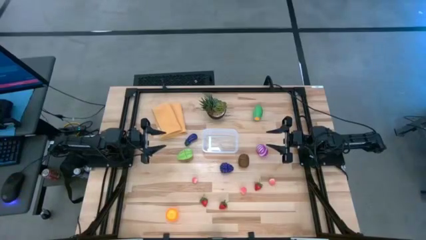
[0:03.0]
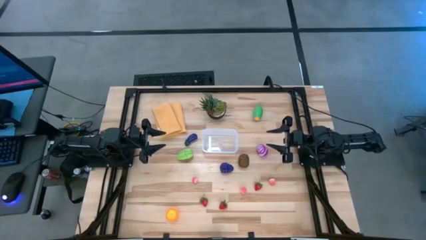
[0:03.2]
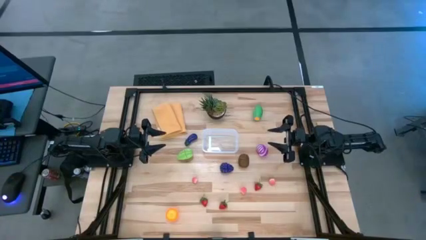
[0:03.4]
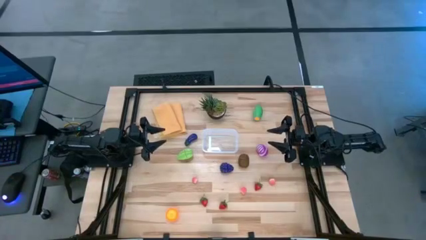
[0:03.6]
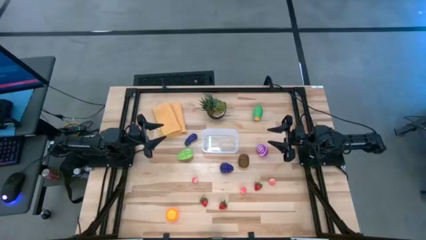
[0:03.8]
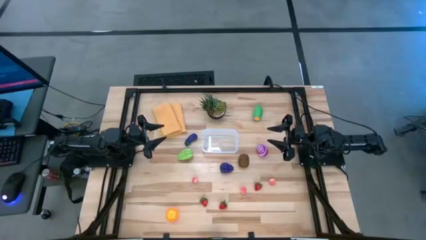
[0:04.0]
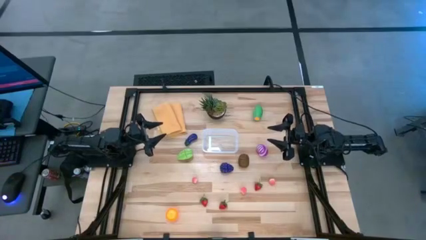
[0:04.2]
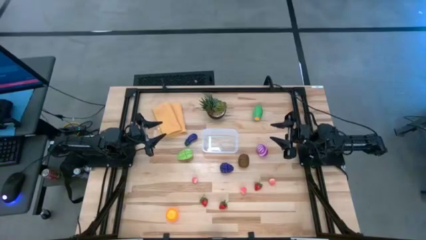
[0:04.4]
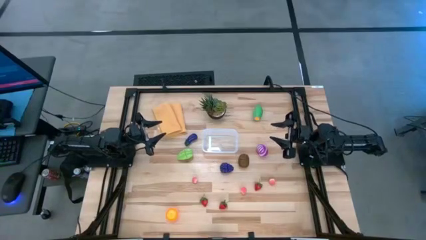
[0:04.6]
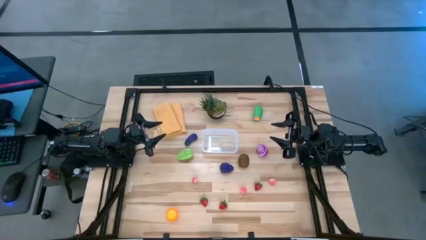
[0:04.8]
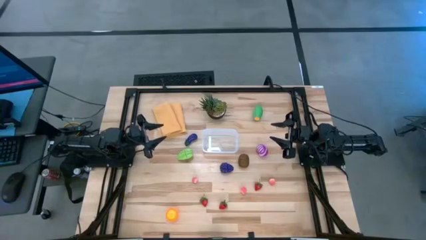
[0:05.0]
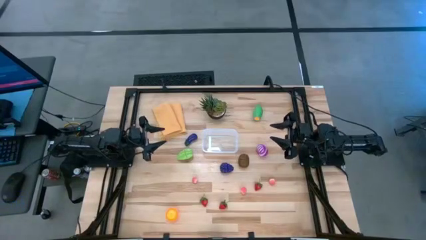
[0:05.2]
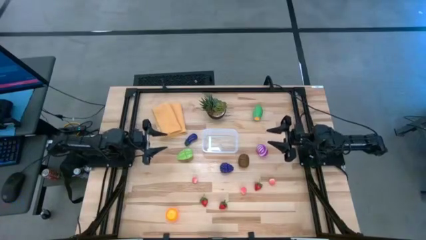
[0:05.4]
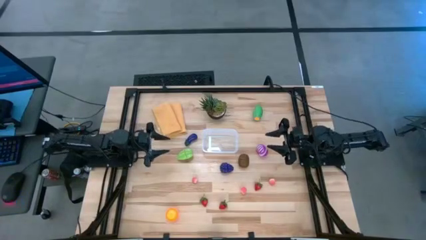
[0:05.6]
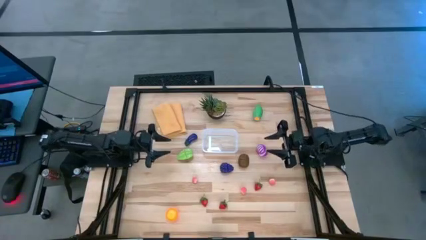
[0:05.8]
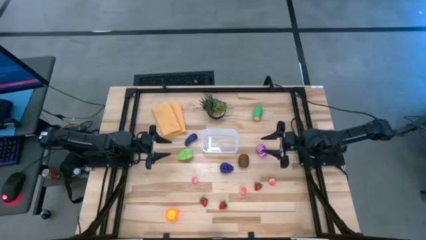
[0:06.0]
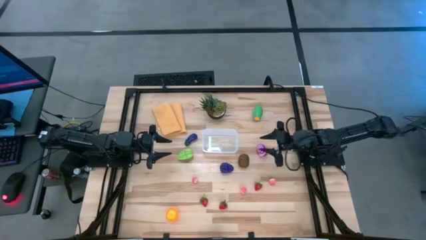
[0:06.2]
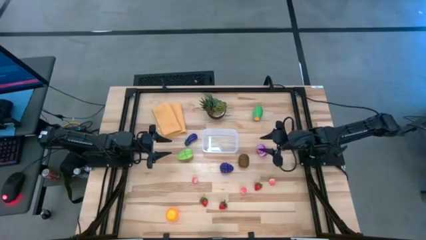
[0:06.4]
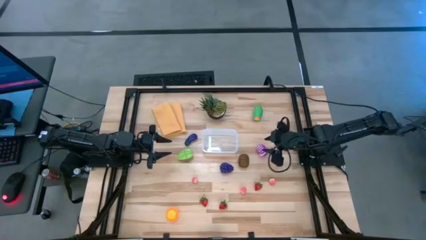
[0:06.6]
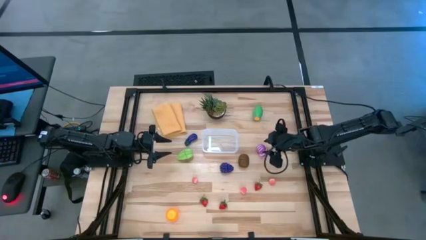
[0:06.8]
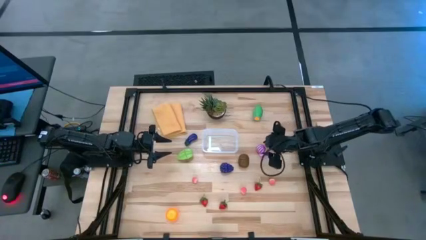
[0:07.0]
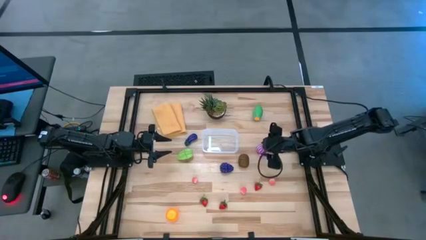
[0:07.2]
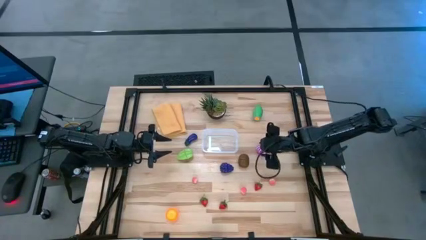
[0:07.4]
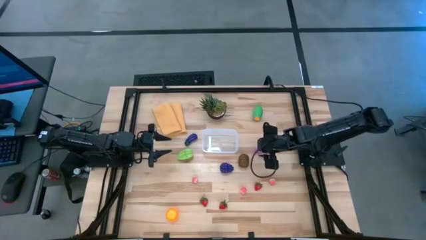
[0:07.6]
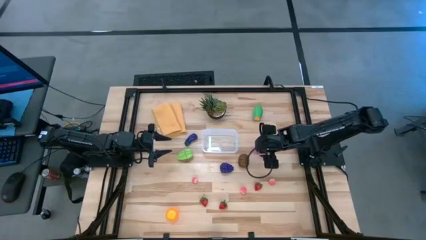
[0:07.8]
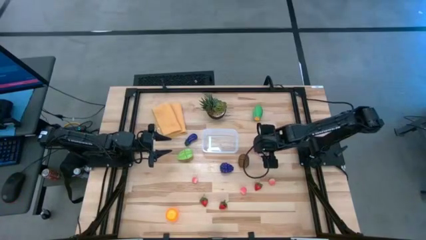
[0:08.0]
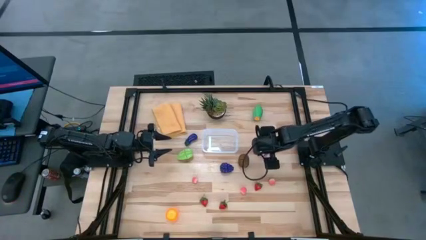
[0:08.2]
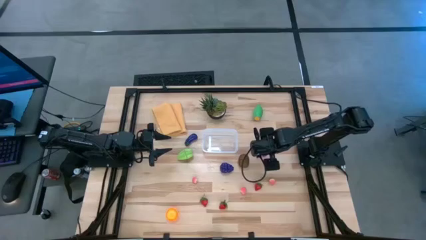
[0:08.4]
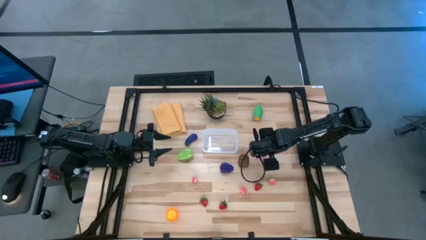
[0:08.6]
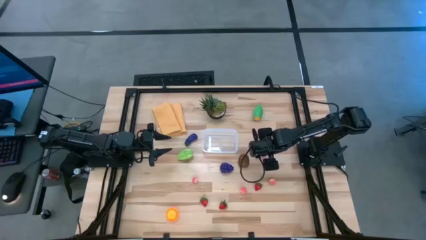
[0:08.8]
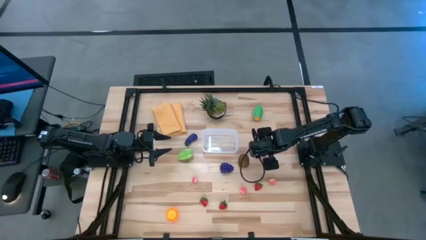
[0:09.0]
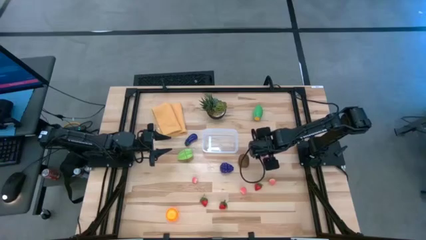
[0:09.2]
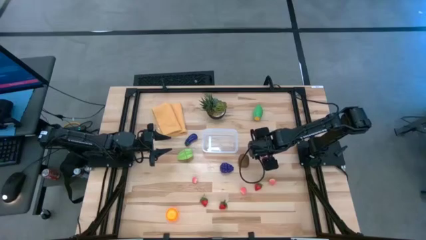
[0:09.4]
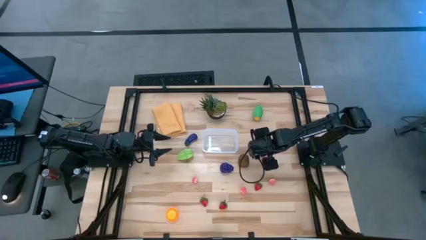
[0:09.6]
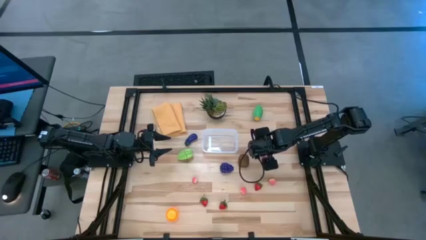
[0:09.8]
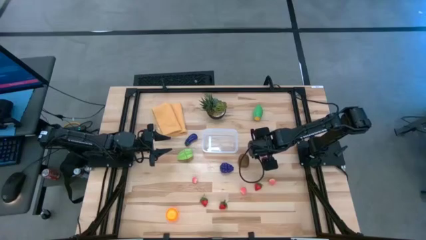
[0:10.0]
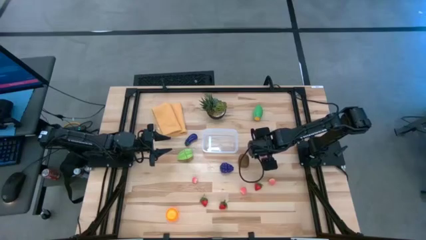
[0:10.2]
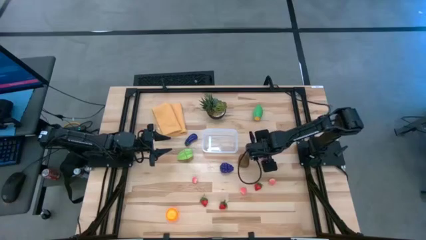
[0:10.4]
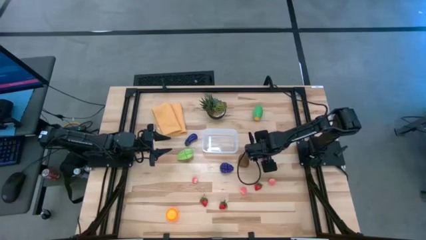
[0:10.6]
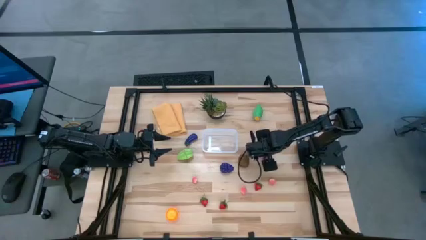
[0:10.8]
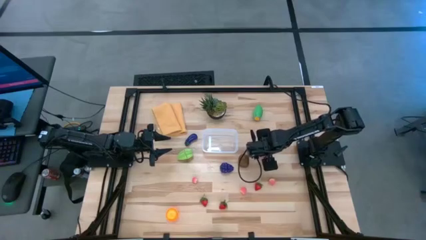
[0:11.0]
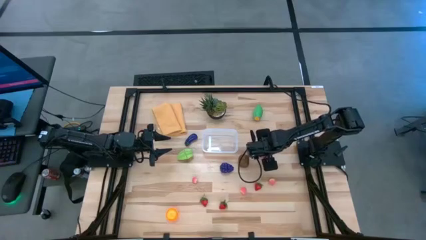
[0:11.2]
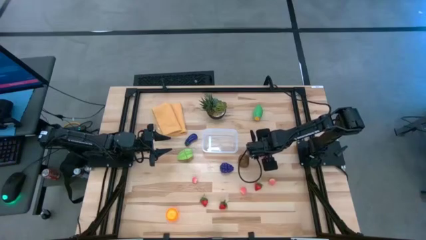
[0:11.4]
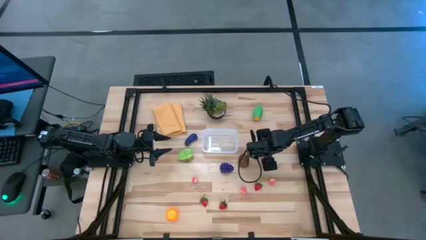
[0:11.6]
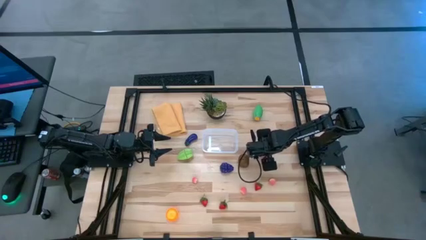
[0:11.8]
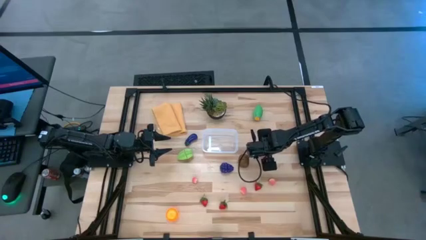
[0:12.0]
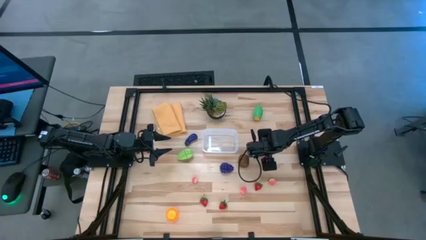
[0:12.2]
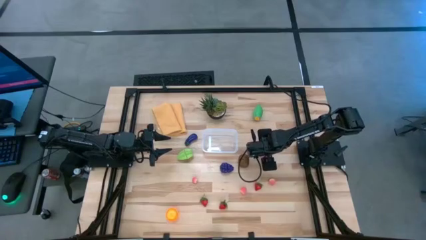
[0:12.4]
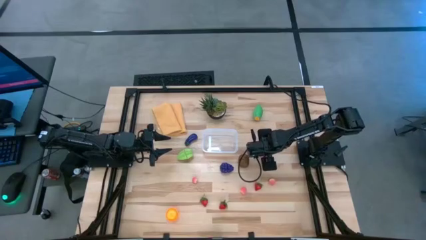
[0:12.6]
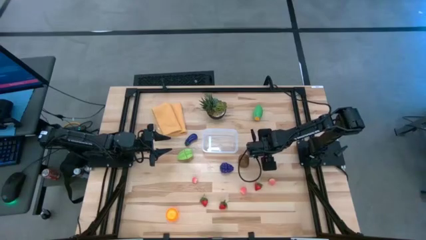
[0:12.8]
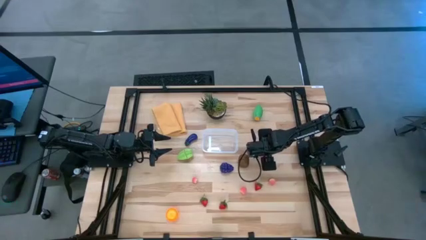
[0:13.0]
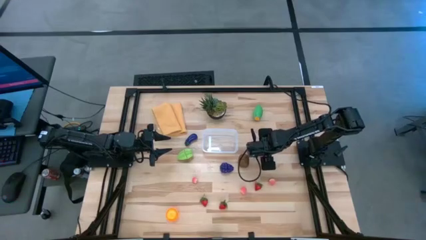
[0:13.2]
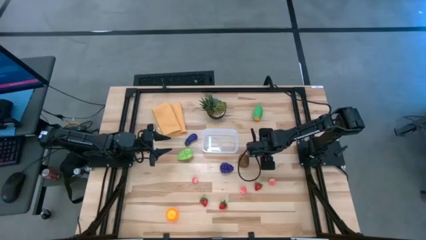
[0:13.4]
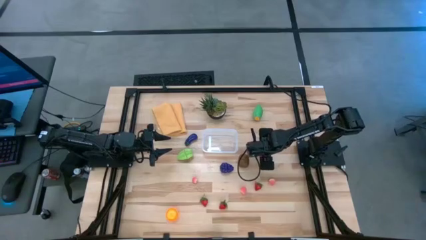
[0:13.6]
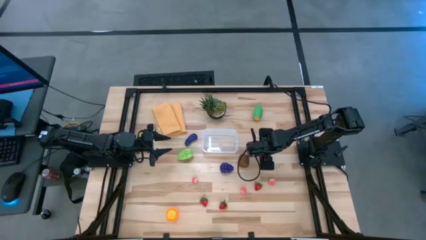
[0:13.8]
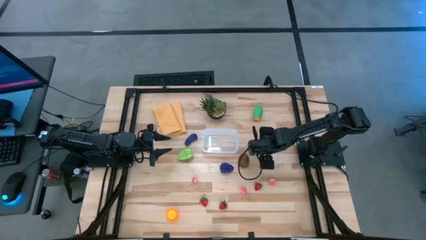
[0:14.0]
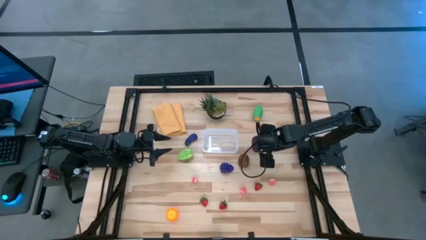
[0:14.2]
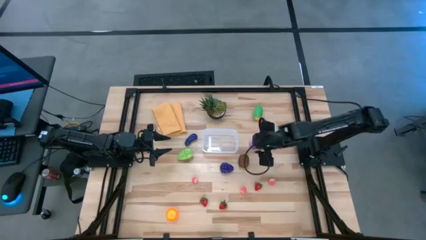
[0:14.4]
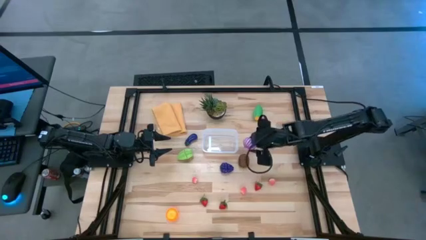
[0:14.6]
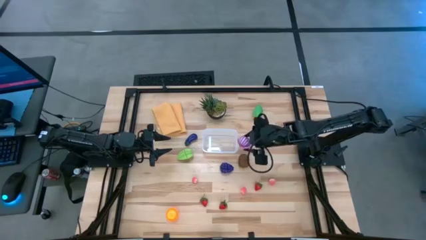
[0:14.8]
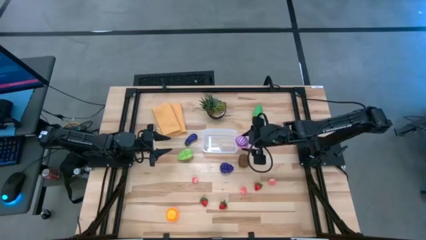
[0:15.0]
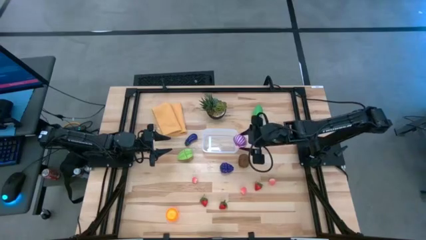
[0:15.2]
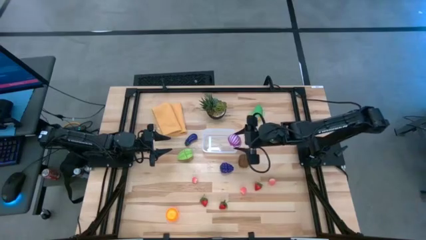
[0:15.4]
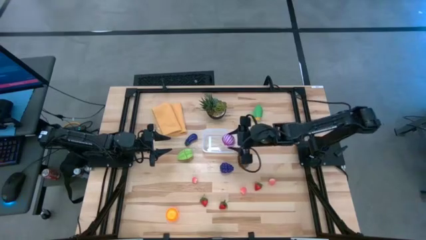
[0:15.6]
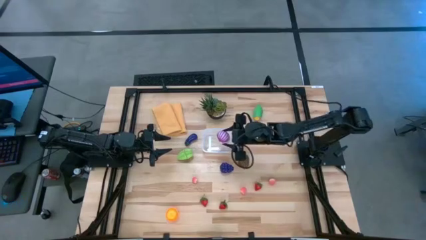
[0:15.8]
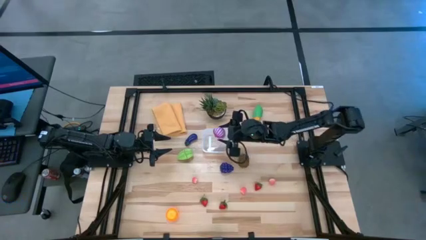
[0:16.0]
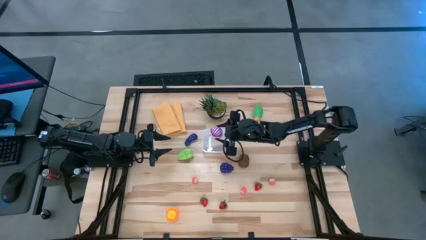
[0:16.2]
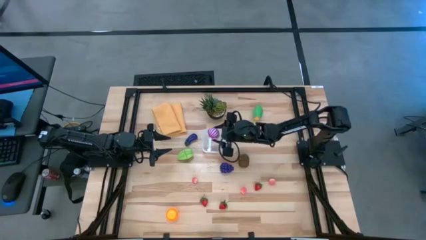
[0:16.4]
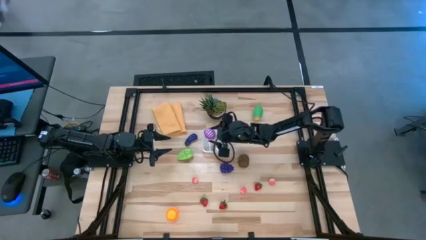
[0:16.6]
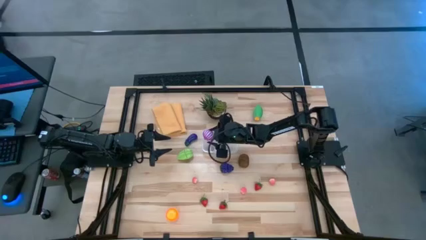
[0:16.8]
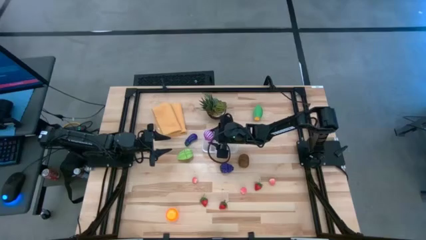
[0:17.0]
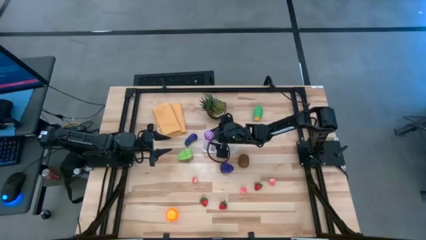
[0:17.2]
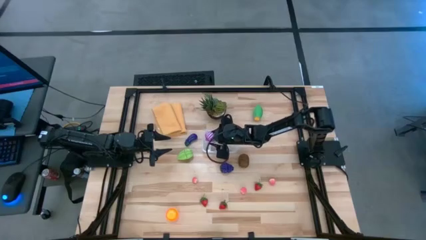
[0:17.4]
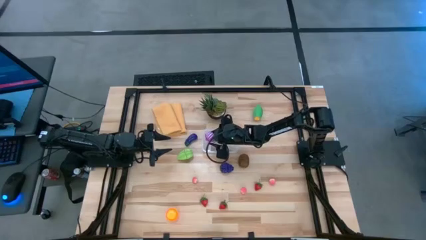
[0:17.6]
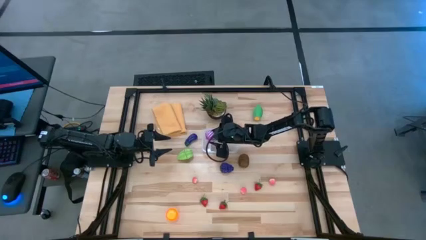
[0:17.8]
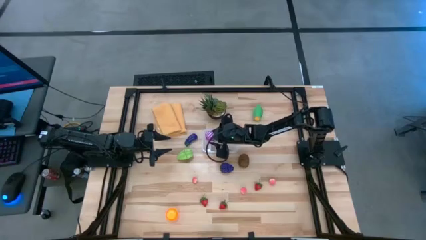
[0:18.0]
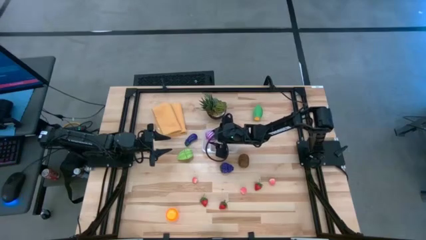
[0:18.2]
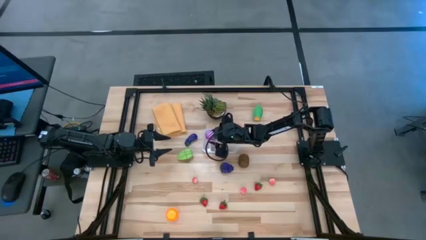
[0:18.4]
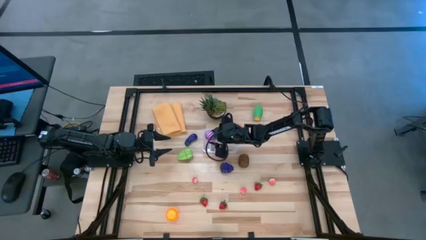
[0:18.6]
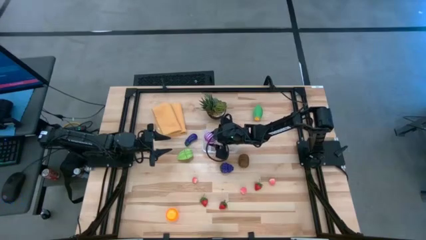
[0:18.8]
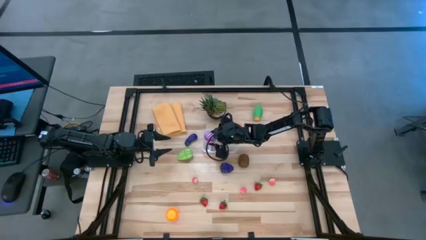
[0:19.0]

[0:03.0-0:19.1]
Task: Pick and placing Produce into tupperware
Put the purple onion into the transparent container
